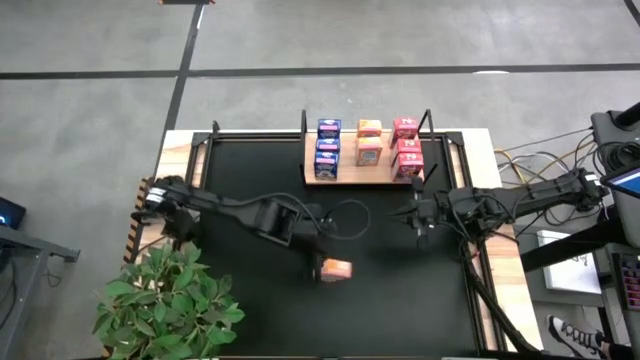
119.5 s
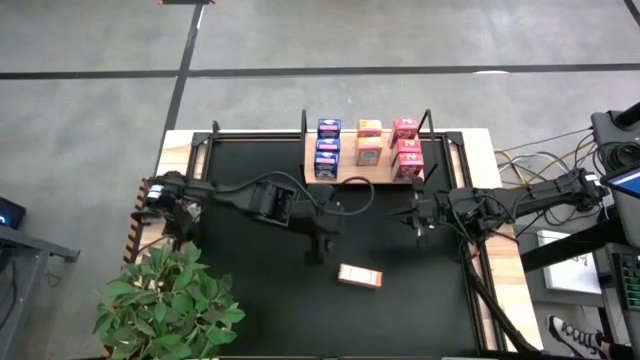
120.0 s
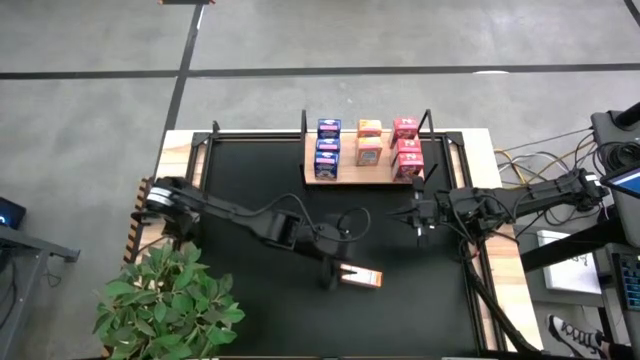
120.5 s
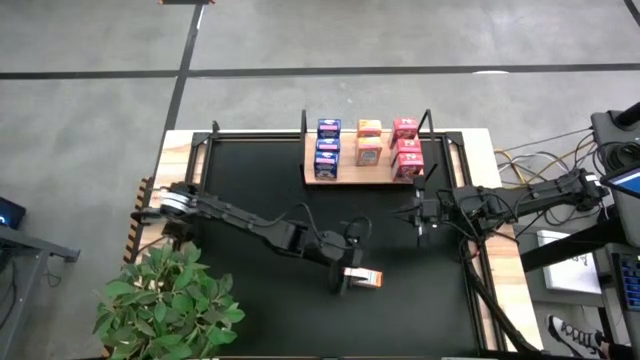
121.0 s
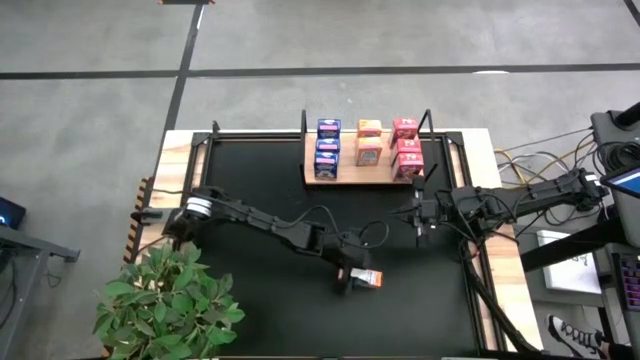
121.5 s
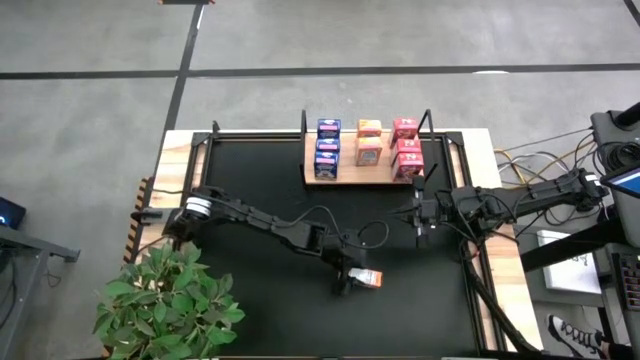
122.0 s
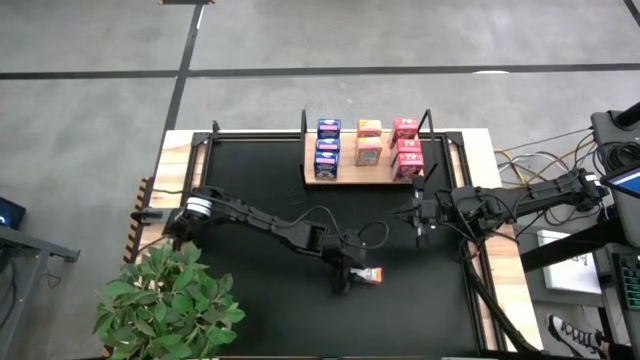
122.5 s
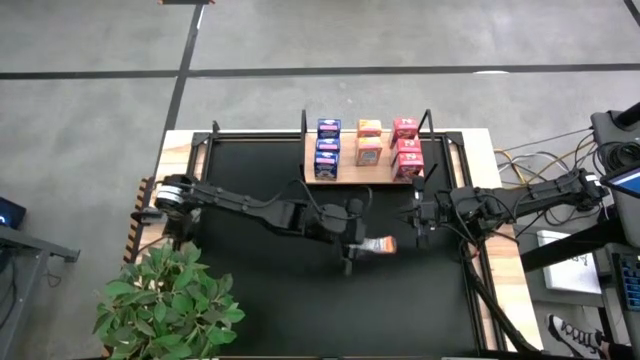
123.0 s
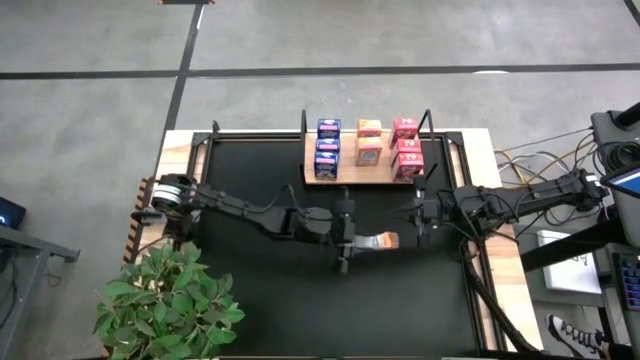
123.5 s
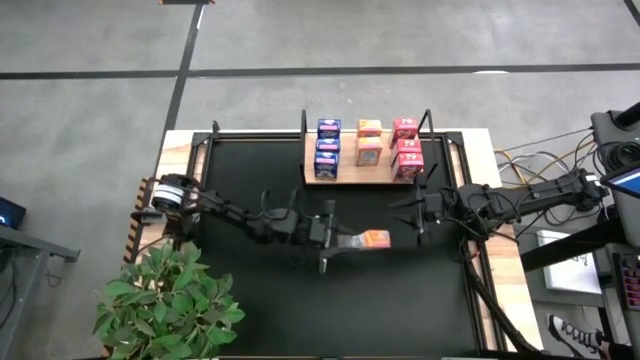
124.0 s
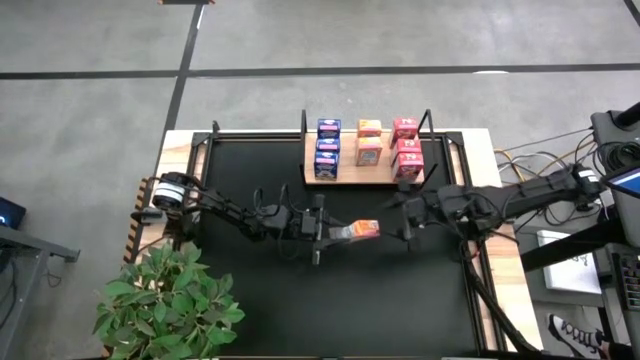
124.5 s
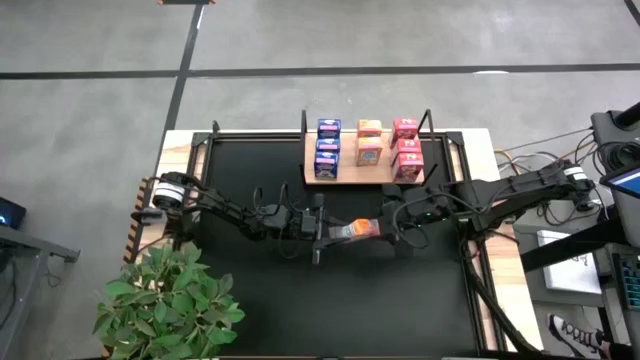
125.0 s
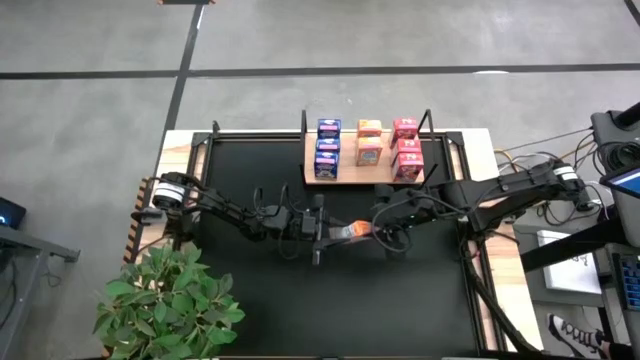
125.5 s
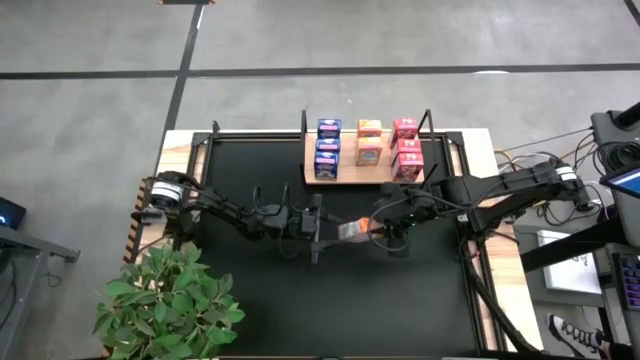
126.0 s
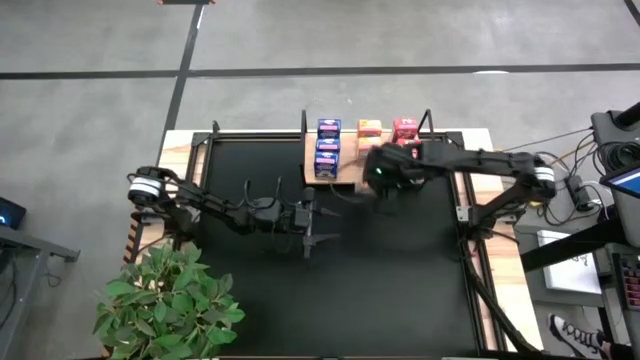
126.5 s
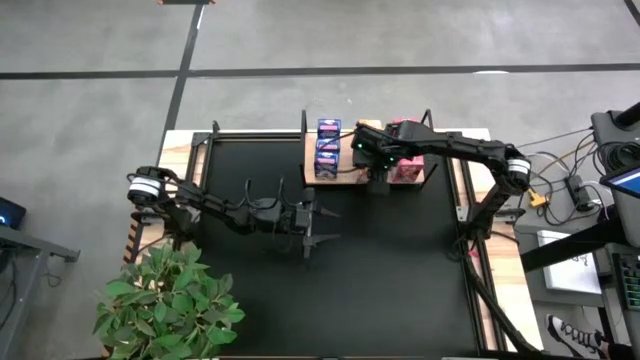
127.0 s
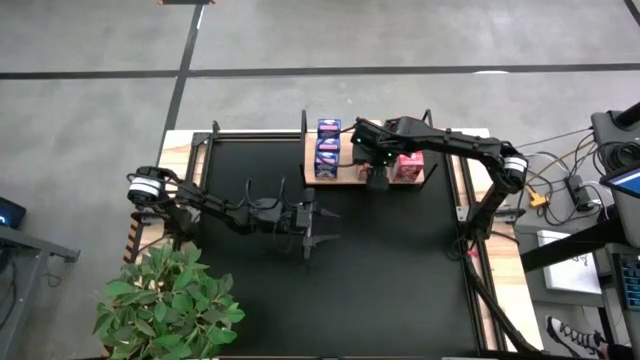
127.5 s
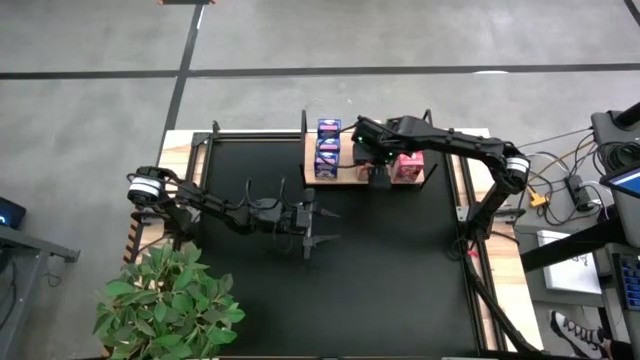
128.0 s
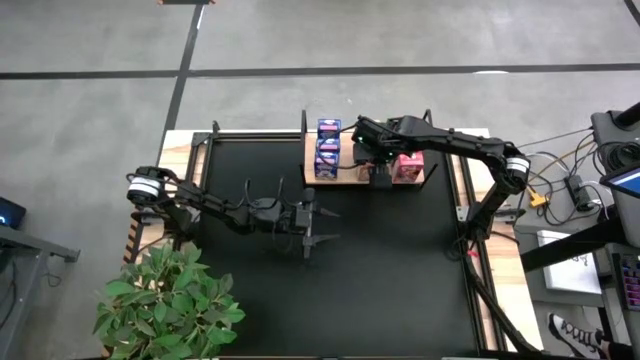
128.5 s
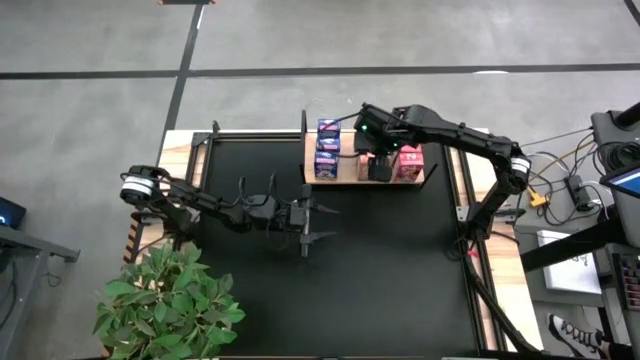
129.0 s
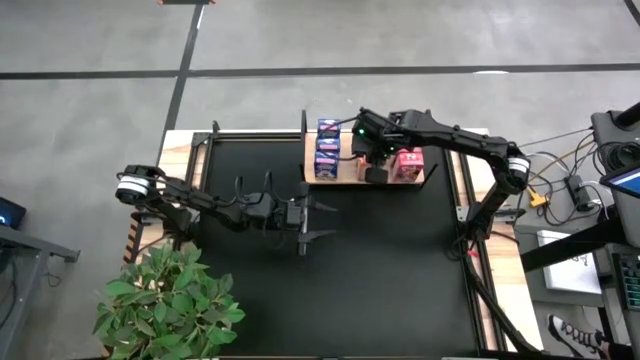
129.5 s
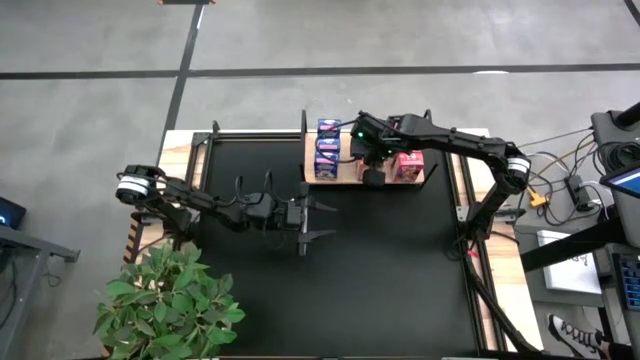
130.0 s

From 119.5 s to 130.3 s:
Task: Stack cereal on shelf
Put the orange cereal box on the shelf aligned with the other orange cereal box

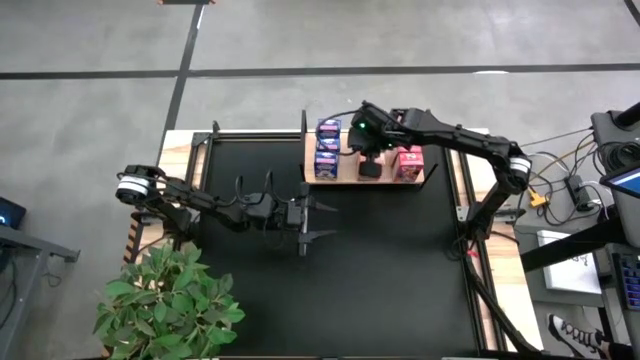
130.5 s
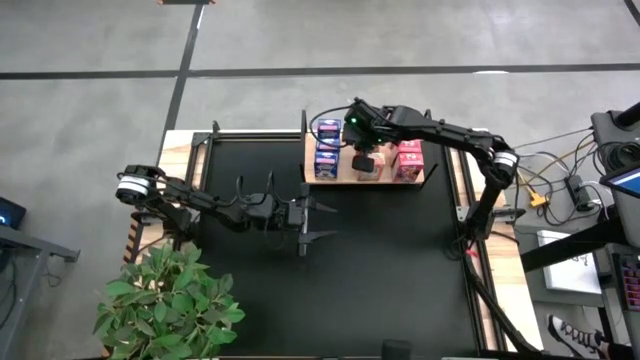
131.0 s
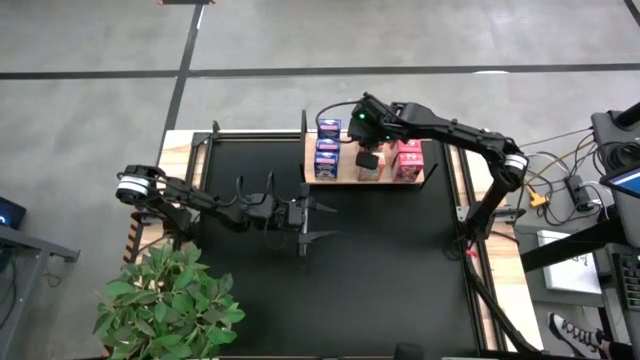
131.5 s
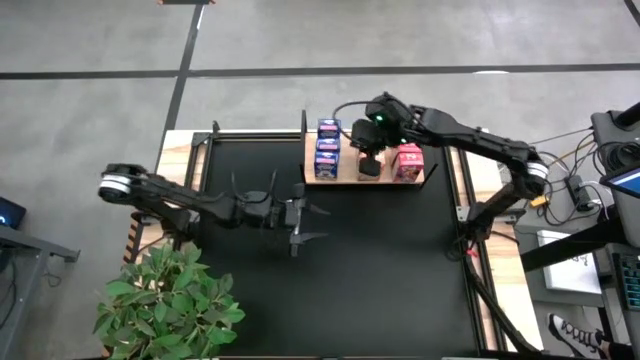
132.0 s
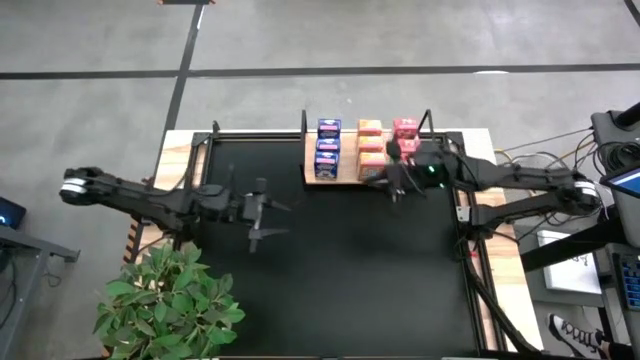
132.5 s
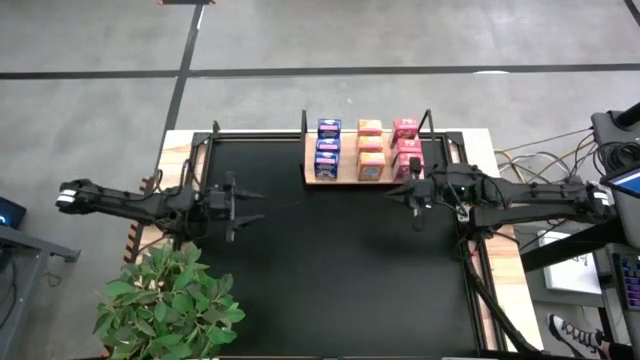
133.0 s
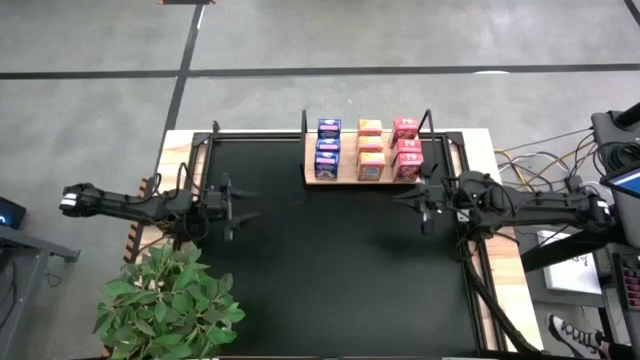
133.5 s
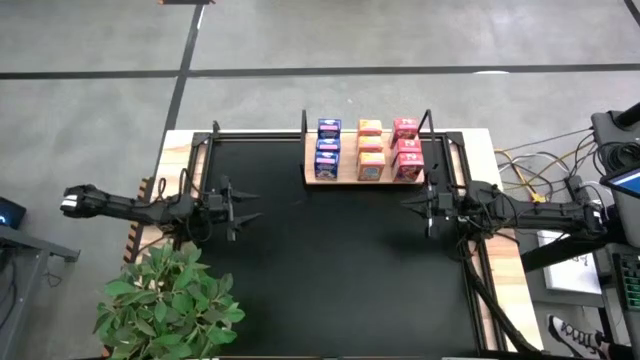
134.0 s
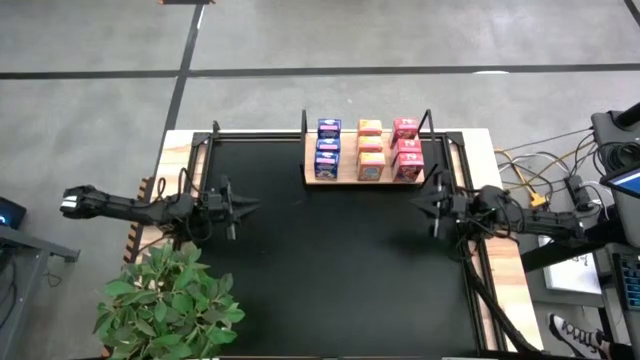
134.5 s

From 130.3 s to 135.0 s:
Return to Home Position

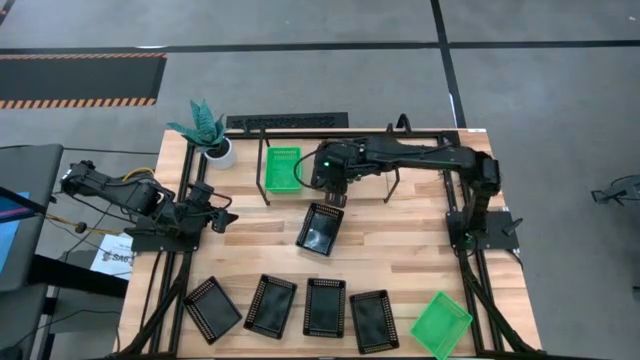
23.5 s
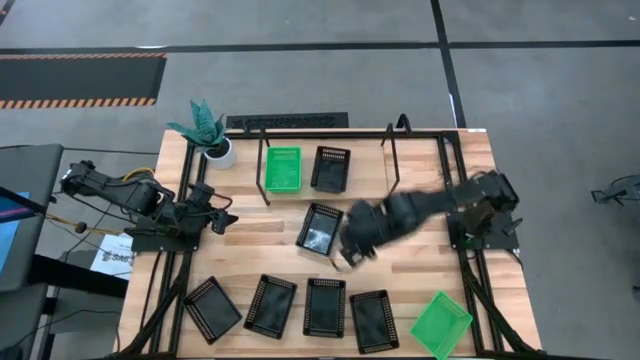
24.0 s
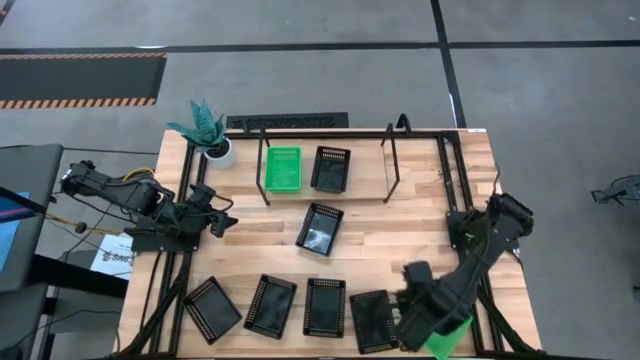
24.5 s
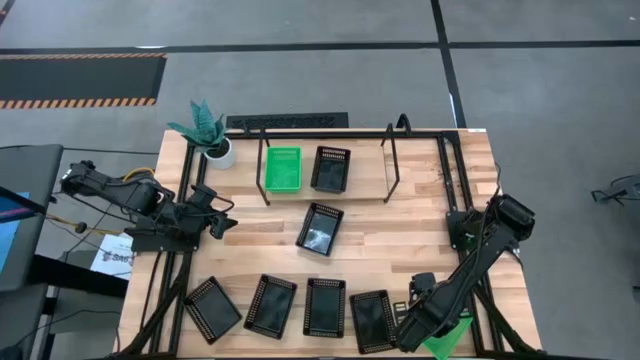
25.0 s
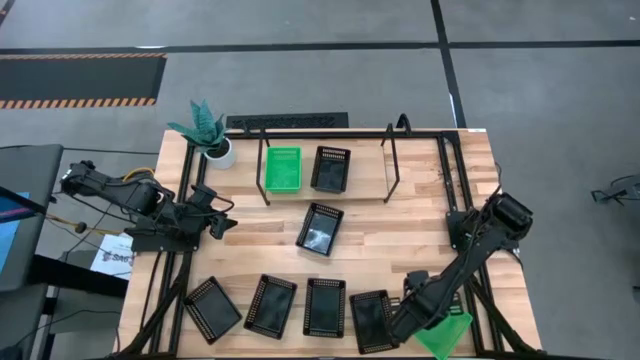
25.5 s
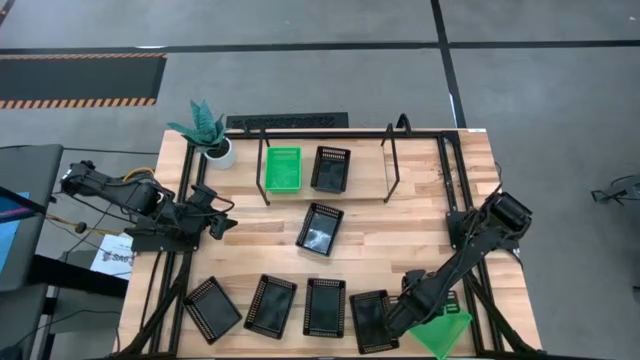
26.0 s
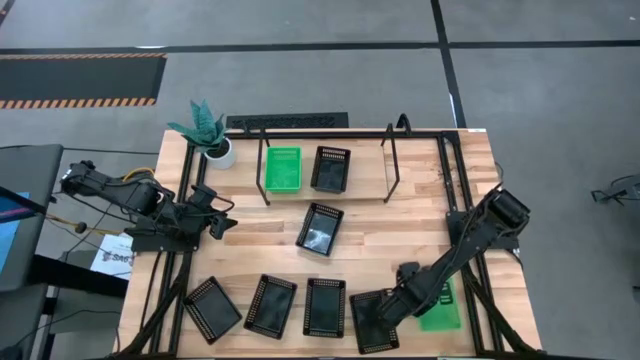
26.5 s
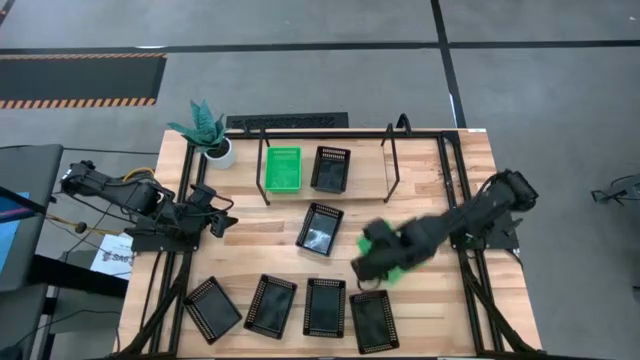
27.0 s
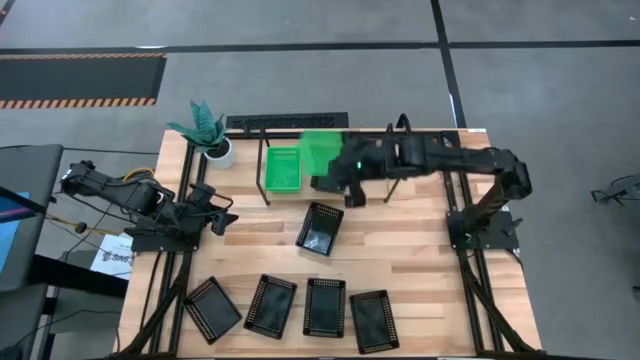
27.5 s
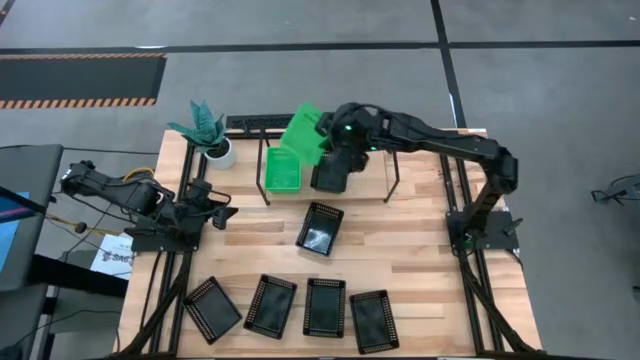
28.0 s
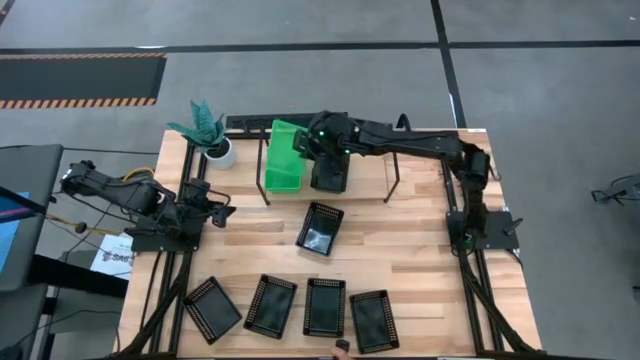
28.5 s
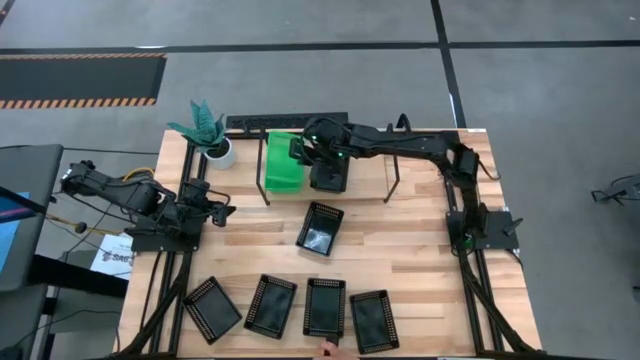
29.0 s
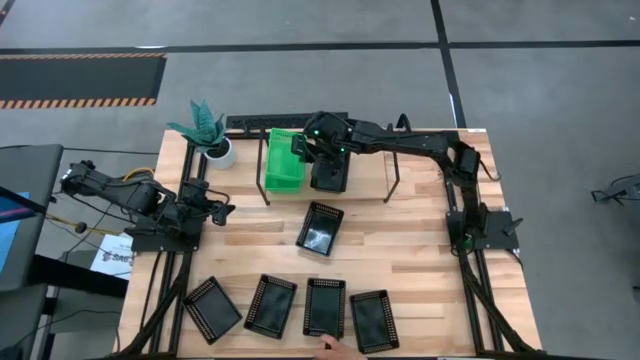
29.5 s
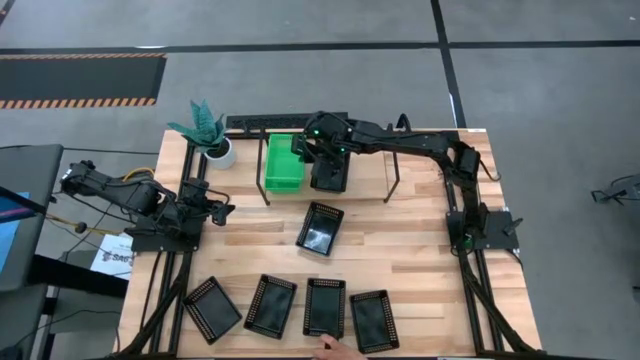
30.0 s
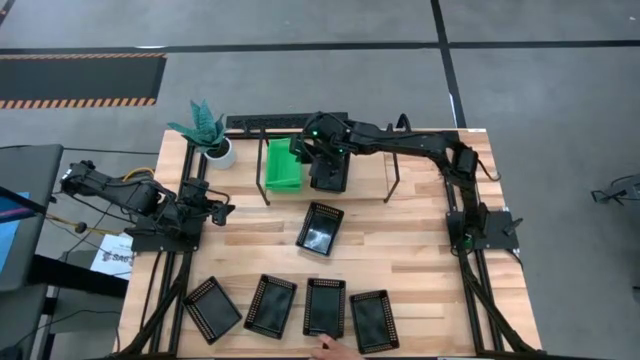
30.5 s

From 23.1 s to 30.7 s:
Task: Stack baskets on shelf by color
Stack the green bin on top of the green stacked bins on the shelf
